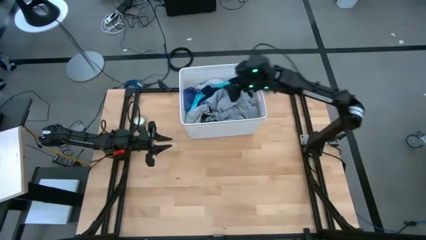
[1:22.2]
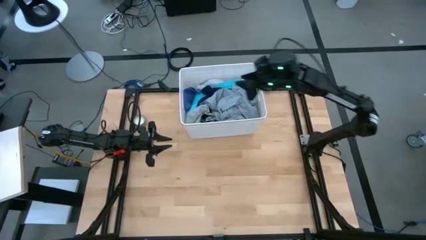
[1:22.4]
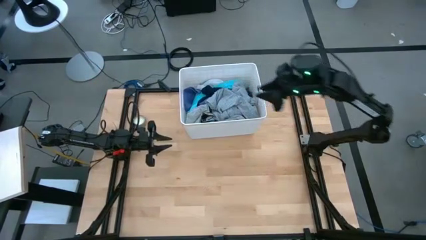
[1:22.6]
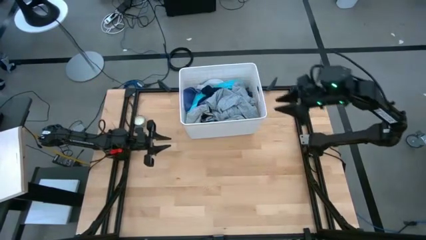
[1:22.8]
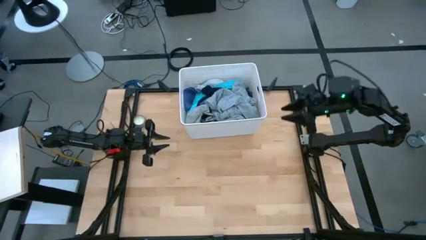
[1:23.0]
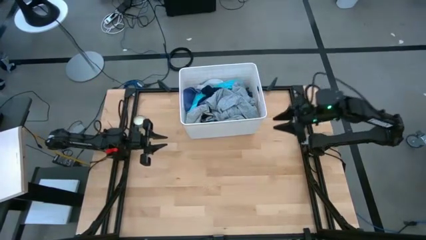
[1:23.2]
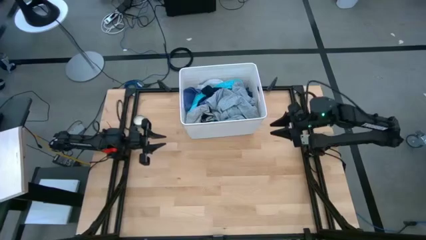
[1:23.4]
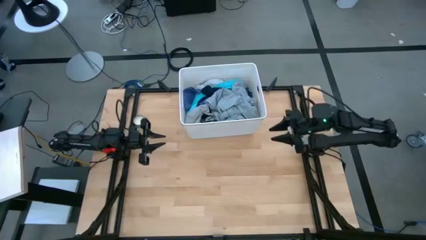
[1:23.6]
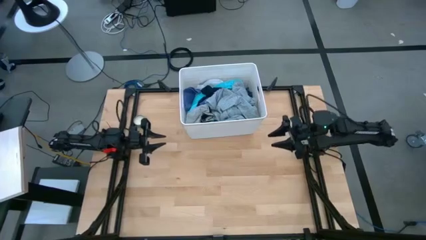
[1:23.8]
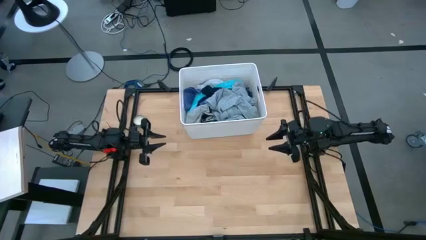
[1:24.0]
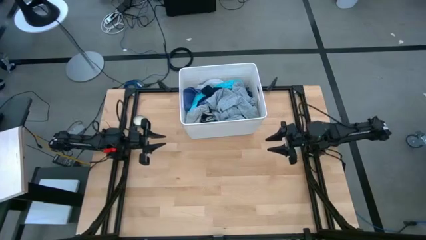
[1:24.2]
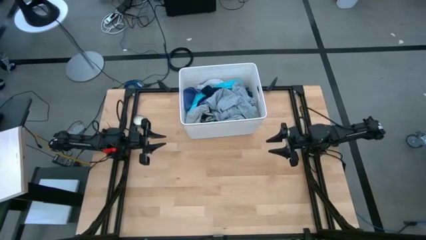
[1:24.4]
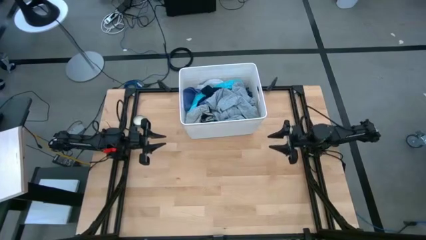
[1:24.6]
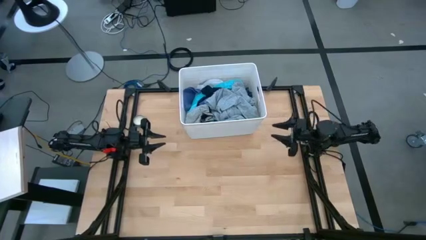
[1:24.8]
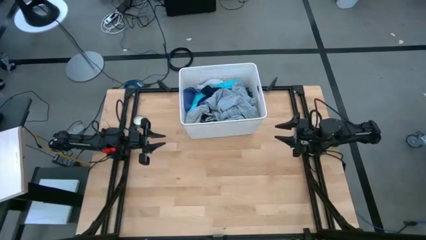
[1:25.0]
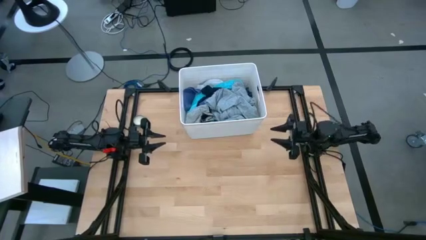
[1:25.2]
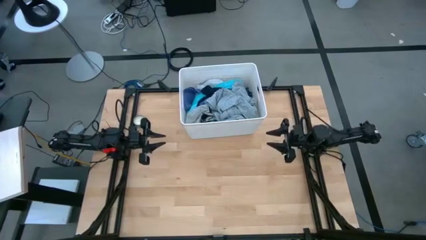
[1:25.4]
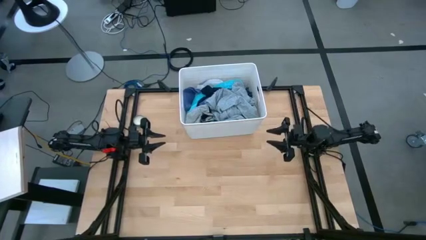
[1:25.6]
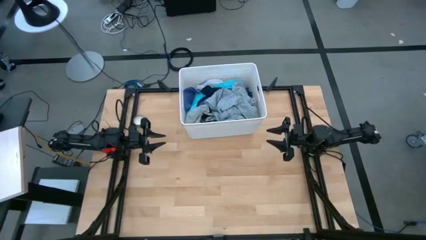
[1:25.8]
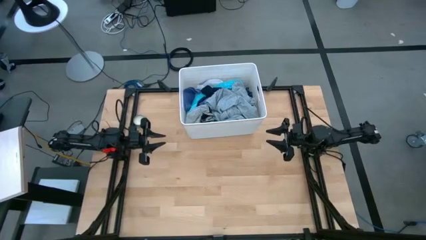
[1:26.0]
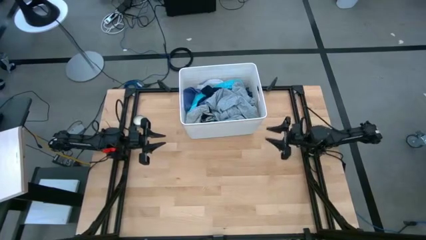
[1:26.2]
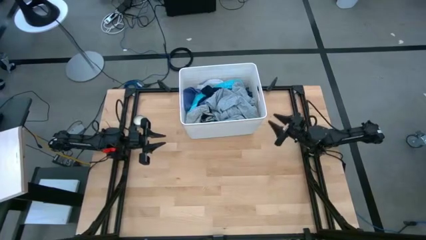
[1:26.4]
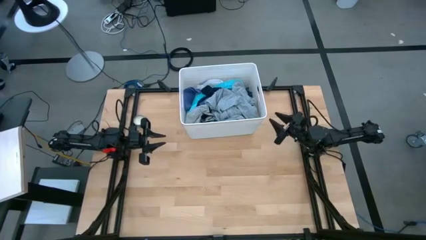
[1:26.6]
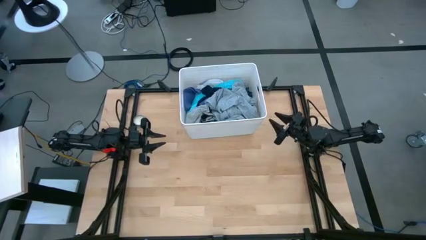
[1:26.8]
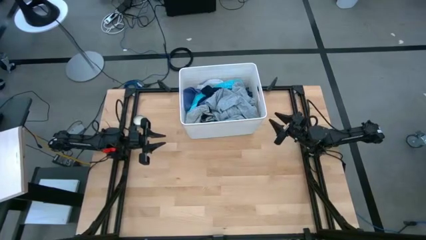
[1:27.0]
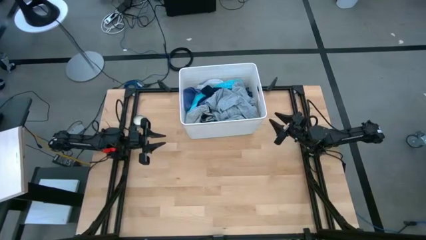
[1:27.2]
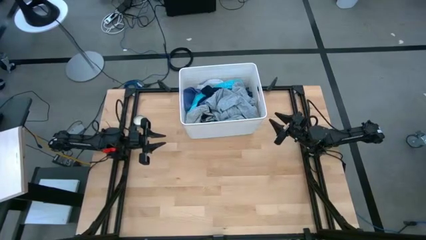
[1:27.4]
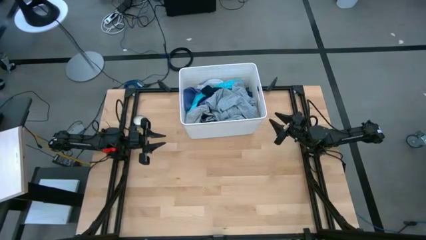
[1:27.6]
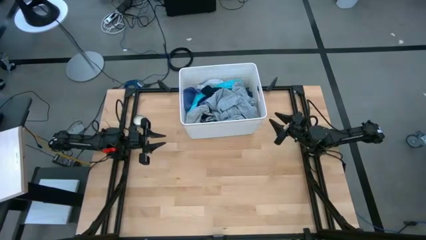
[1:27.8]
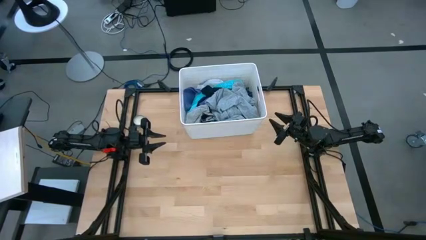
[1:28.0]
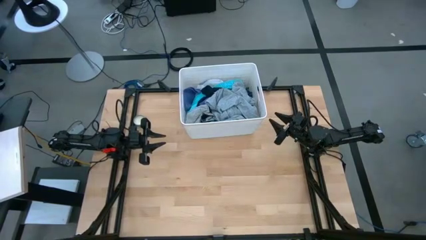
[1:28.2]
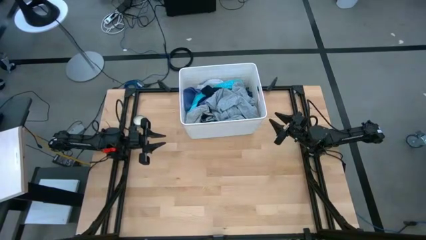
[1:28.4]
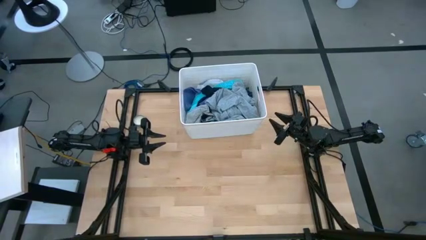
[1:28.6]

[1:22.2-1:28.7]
Task: Sort clothes
Return to Home Position

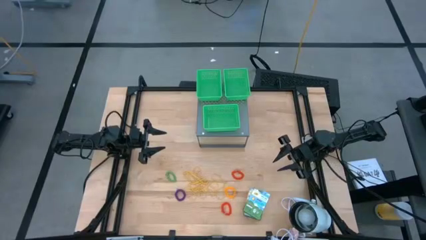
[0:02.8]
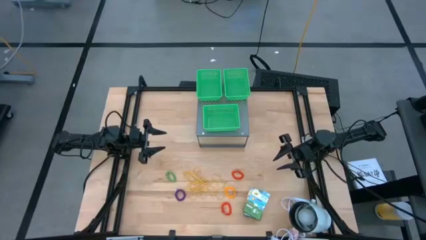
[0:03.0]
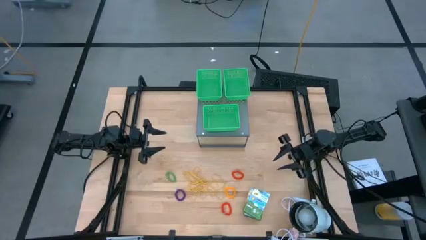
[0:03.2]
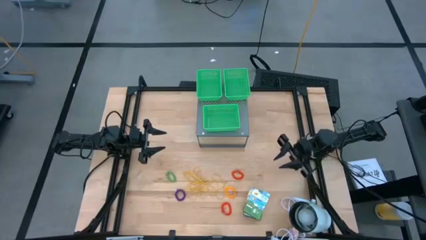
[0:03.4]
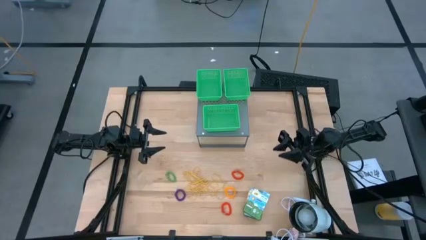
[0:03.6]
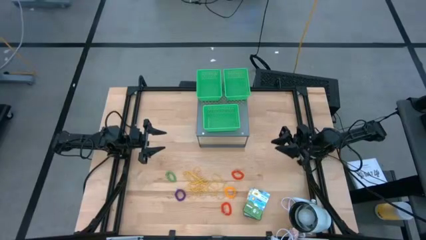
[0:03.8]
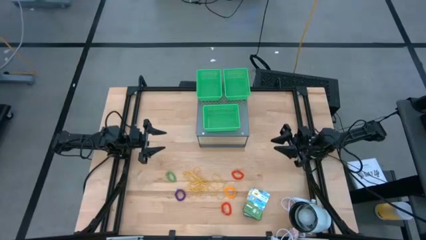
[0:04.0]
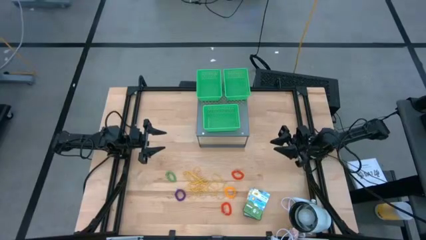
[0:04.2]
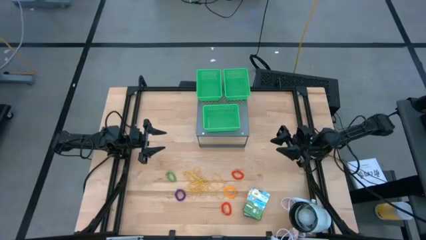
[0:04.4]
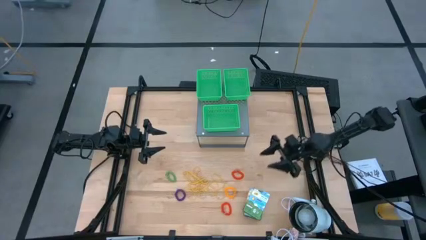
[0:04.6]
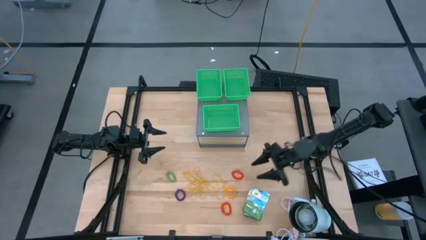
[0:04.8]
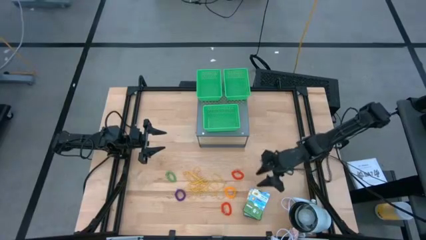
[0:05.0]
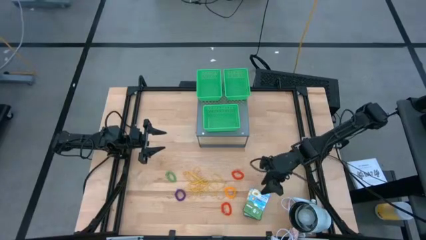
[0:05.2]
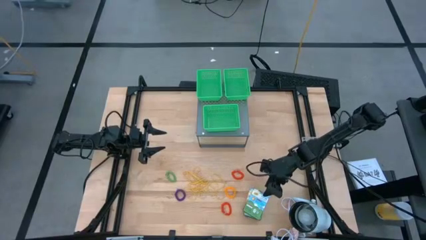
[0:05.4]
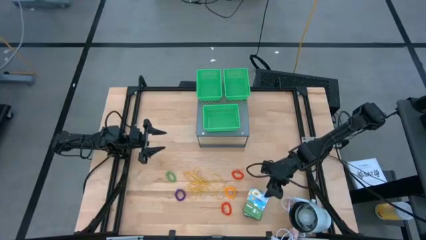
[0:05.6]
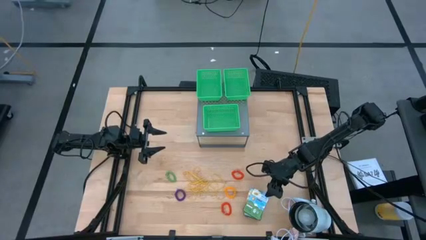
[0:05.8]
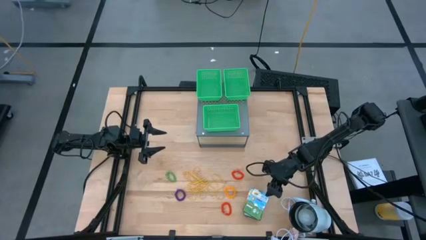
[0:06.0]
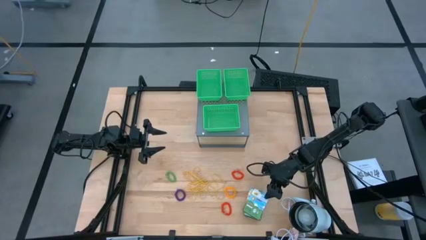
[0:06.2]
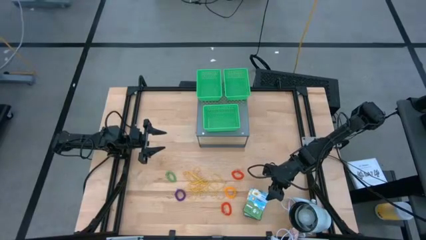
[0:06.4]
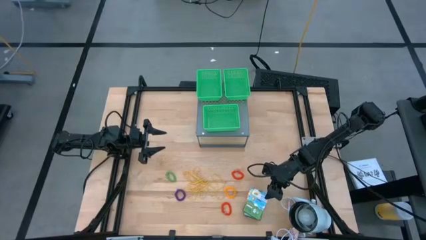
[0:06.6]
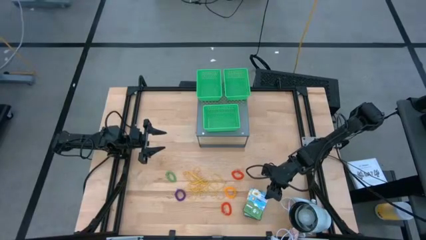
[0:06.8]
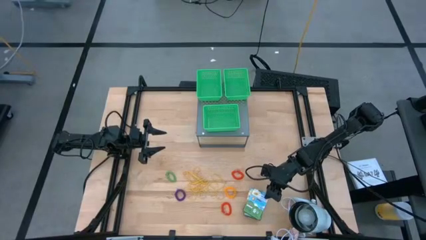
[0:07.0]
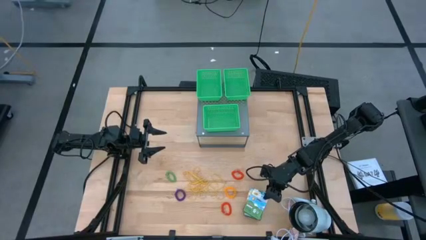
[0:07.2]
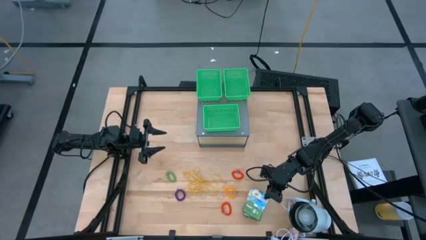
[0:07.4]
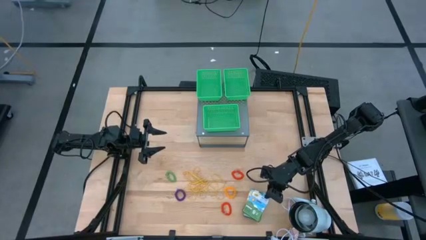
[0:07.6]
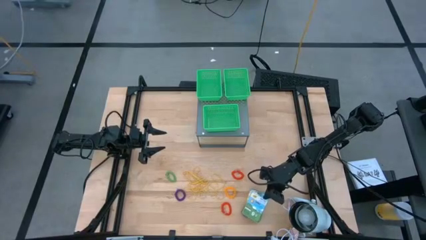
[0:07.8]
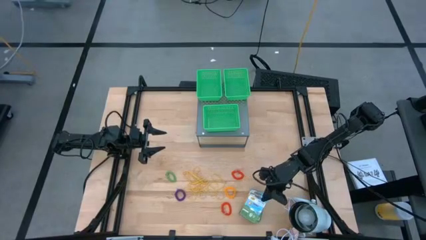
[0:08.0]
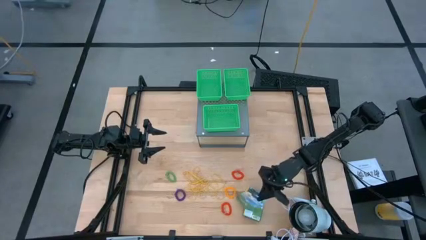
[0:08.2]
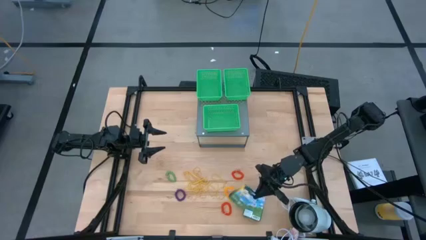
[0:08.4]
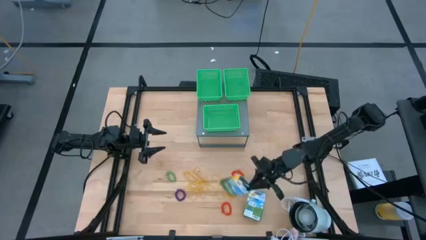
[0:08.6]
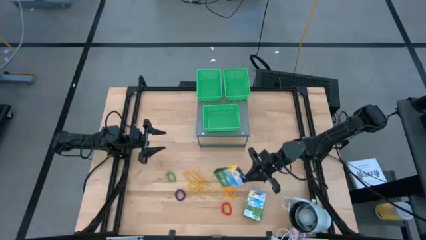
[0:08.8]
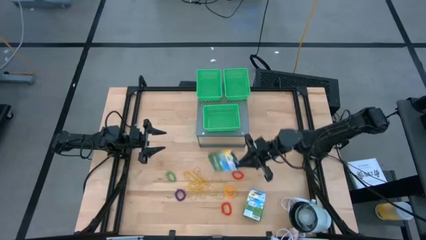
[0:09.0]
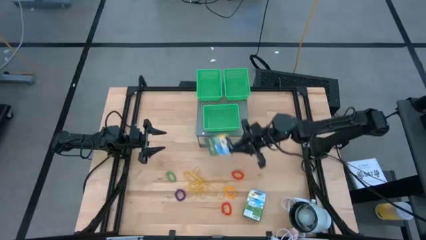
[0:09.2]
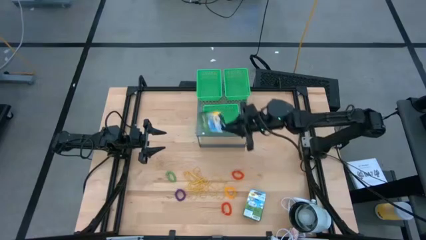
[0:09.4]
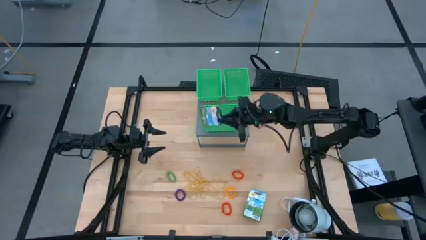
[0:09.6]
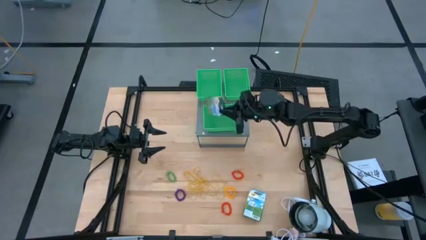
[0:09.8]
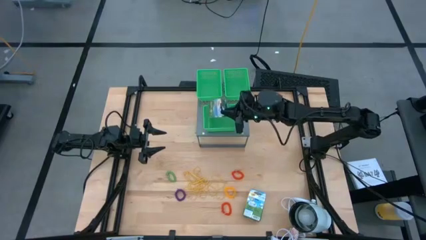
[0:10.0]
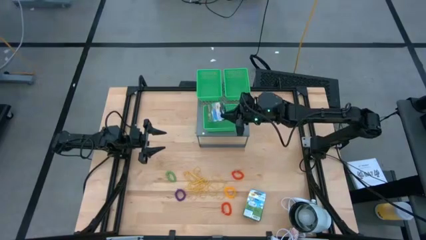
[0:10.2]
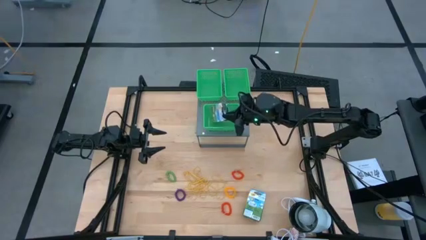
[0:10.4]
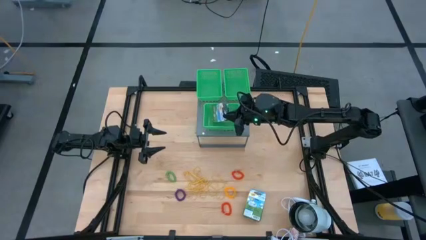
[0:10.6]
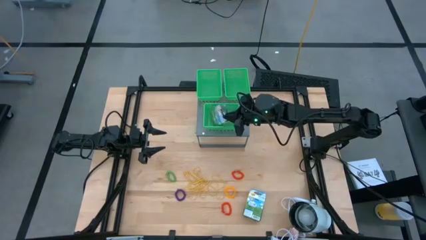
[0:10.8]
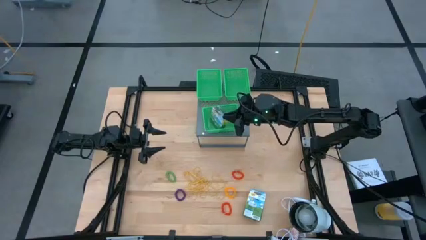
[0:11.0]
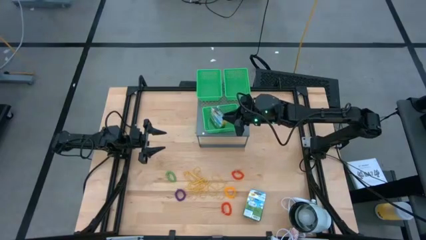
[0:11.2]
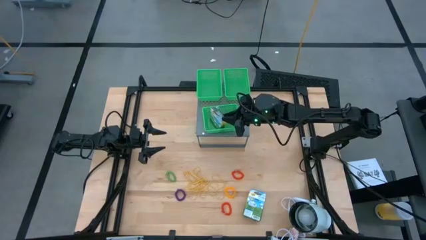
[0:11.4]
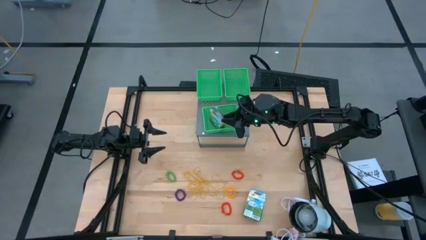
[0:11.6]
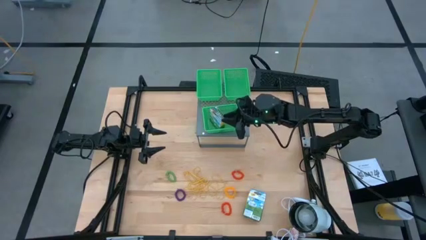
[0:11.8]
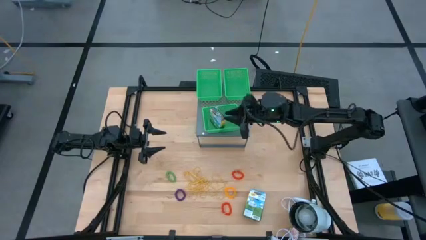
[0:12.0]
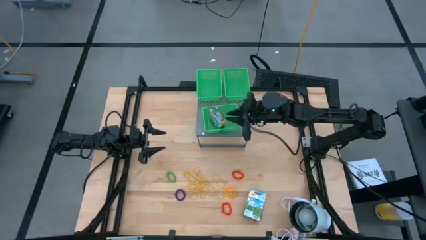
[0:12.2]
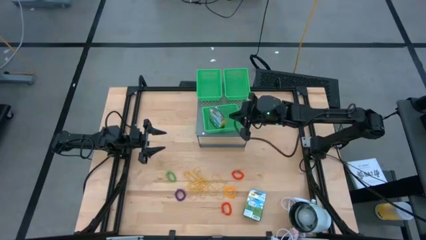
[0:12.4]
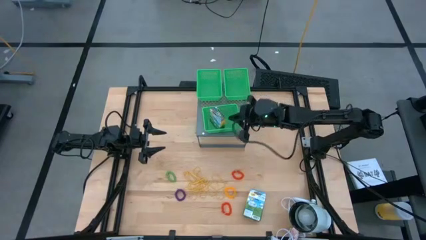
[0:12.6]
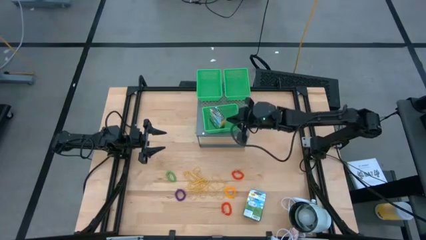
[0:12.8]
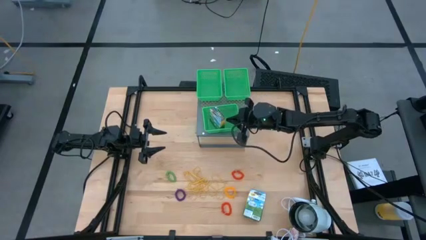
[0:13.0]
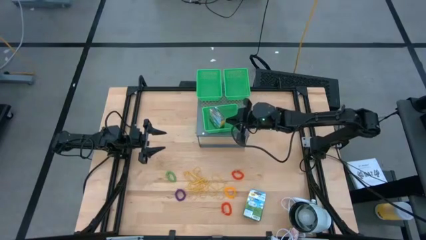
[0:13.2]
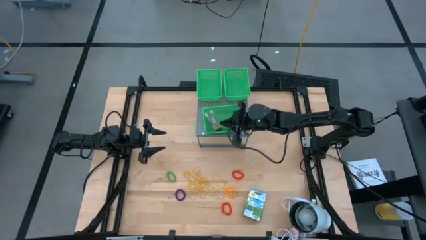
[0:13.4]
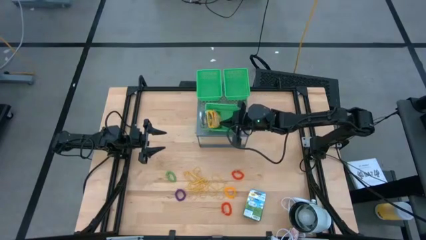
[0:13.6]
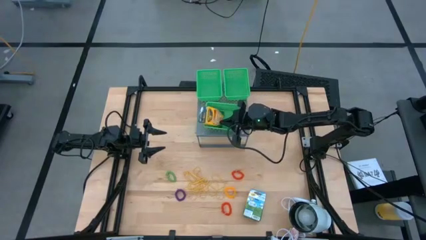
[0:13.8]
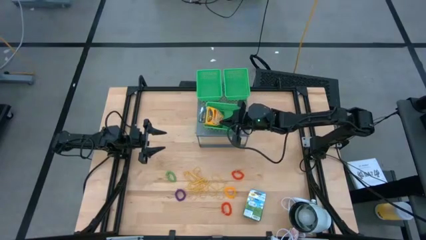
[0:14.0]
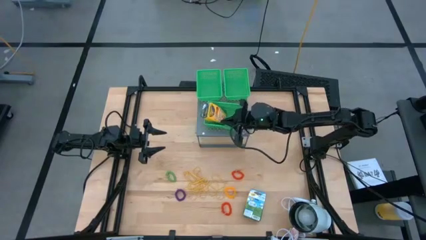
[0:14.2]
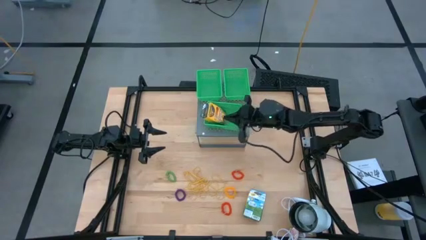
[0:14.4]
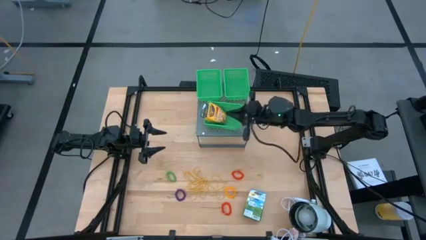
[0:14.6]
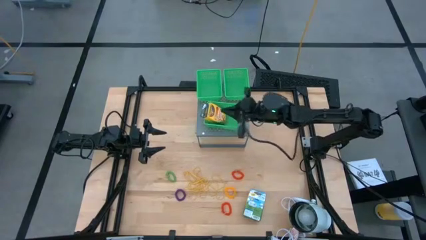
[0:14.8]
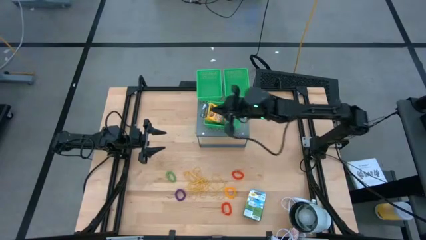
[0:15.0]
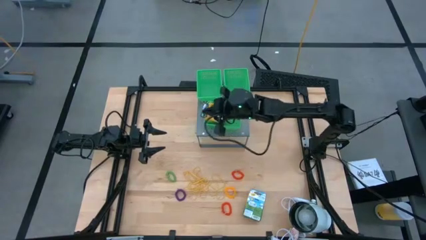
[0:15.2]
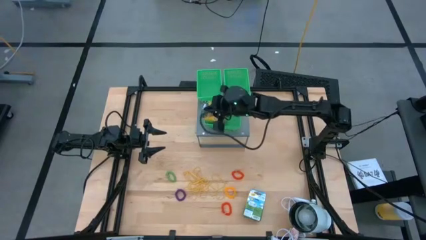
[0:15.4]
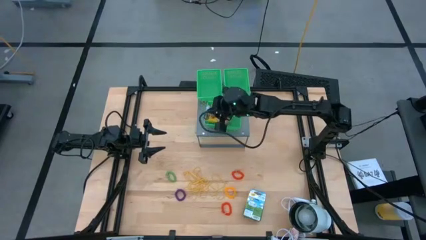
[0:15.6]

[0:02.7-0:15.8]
Task: Pick & Place Office Desk Supplies
Put the crayon box into the bottom green bin on the shelf
